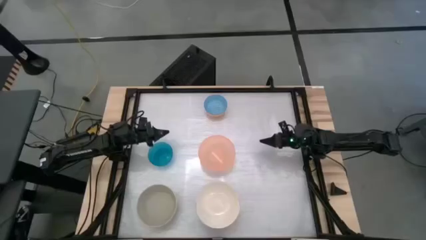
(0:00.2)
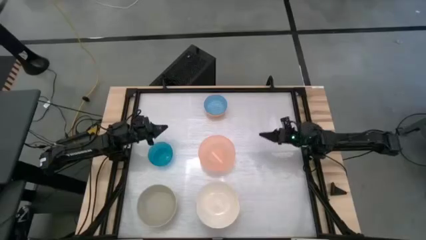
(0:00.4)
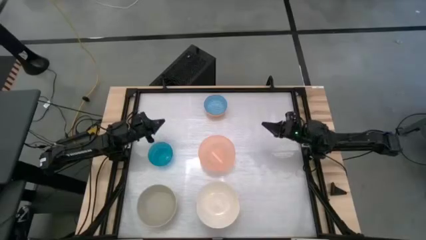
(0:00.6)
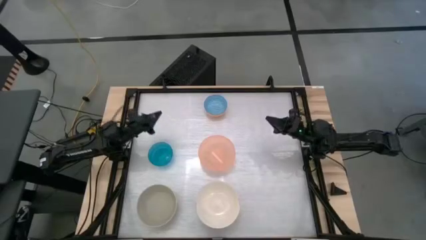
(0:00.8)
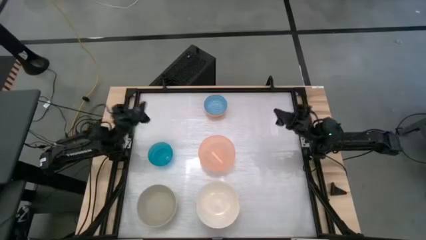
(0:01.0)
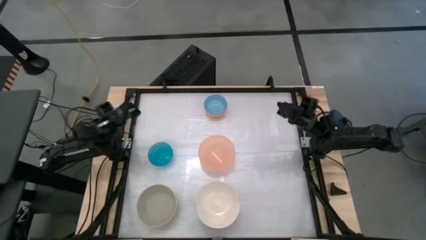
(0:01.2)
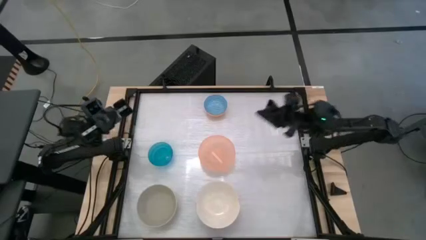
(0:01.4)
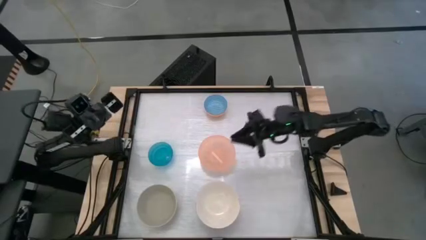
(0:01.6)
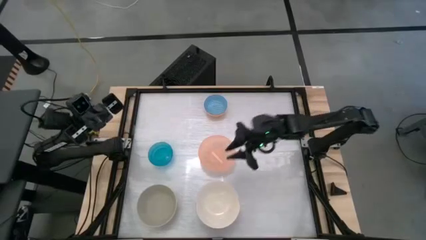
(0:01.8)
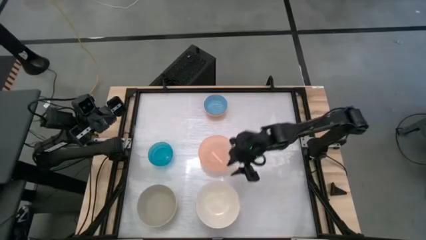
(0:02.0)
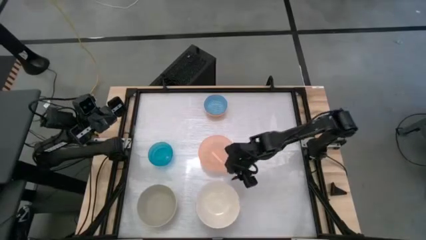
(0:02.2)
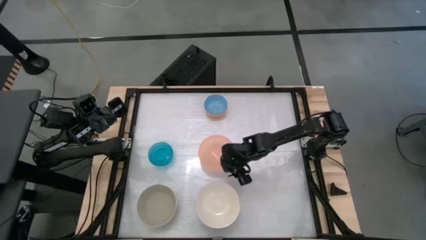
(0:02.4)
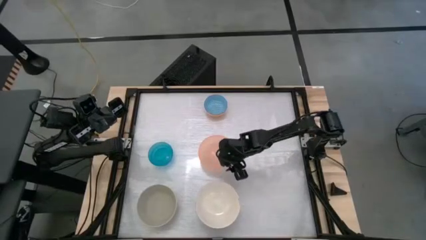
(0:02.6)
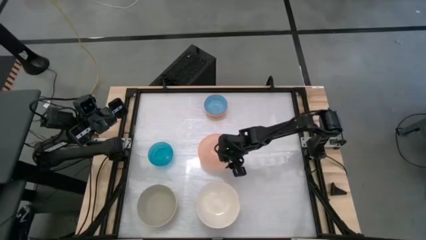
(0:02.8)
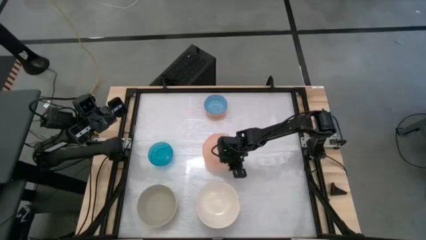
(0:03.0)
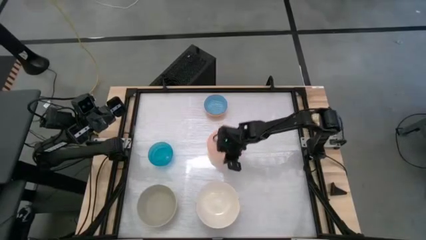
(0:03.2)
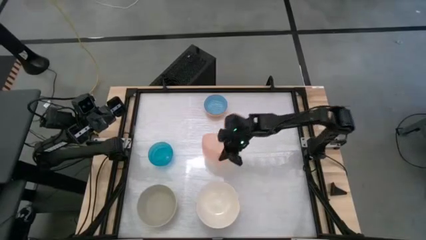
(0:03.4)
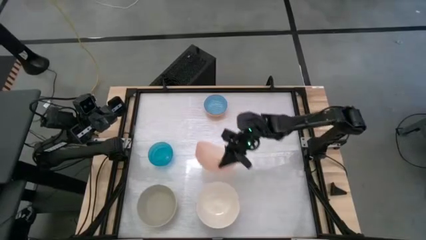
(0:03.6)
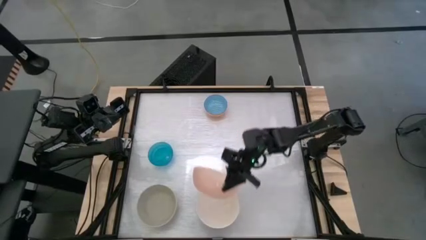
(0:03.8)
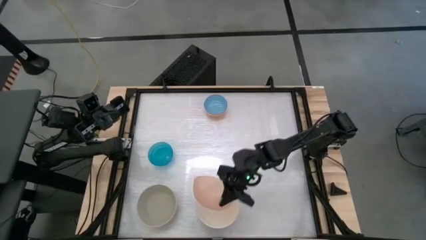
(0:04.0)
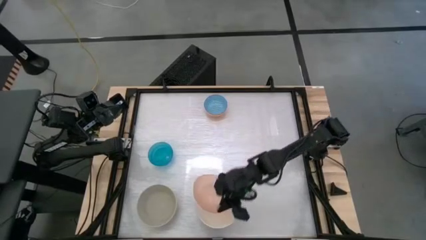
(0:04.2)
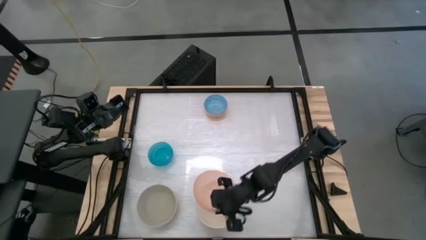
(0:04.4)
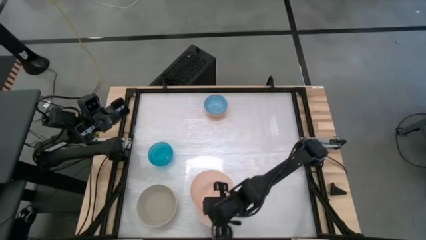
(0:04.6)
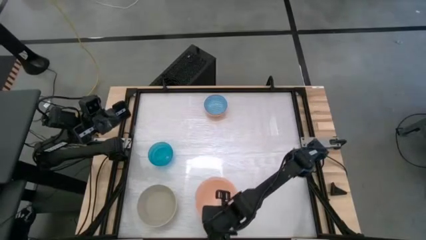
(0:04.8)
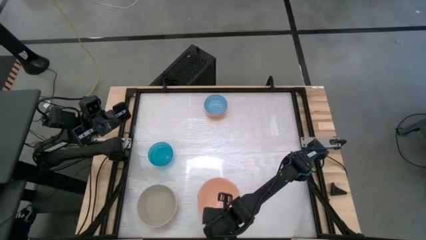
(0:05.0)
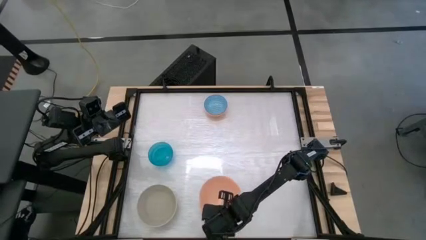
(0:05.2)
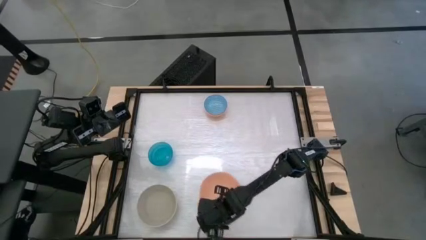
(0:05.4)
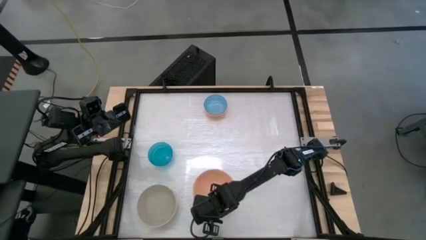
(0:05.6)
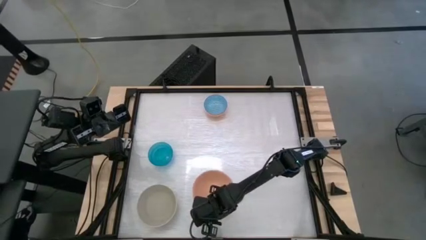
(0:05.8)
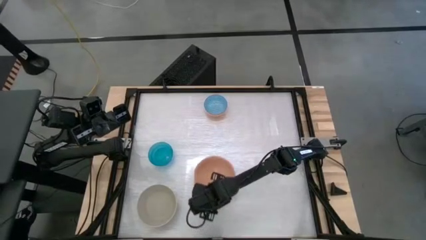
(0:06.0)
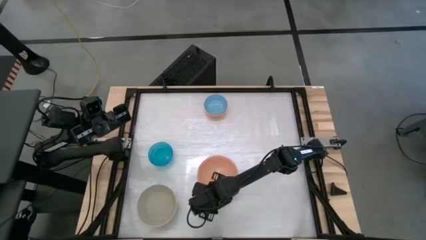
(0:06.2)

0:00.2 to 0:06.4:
Stack the orange bowl on top of the white bowl

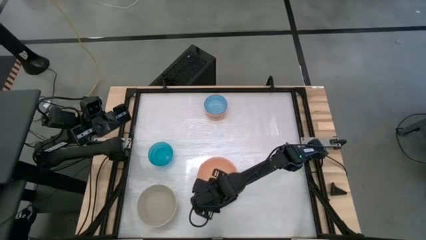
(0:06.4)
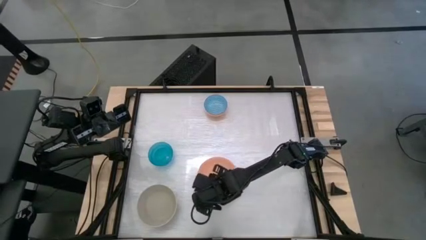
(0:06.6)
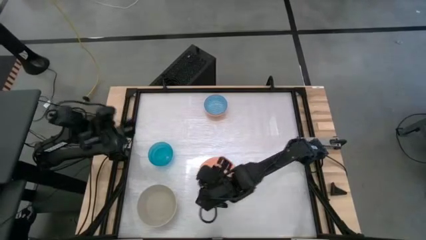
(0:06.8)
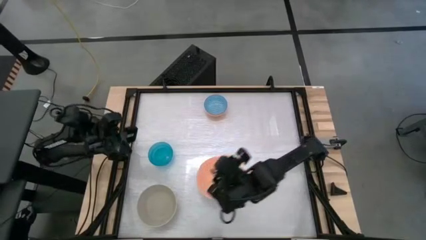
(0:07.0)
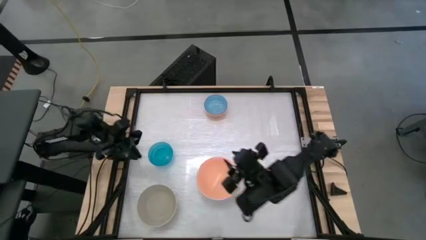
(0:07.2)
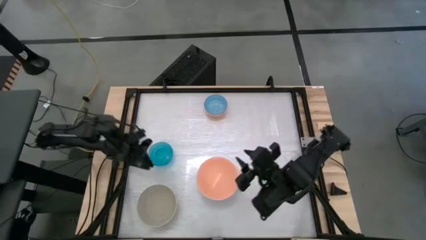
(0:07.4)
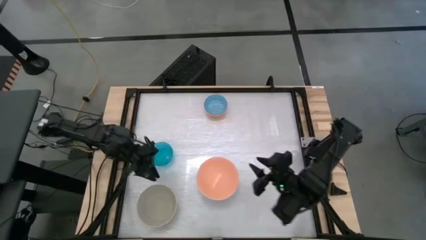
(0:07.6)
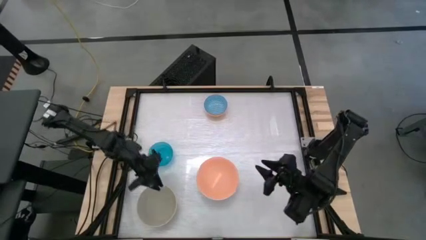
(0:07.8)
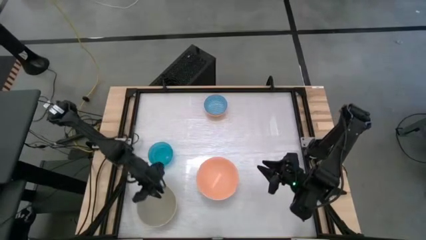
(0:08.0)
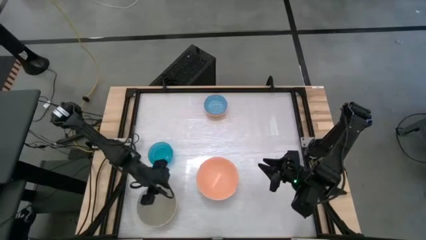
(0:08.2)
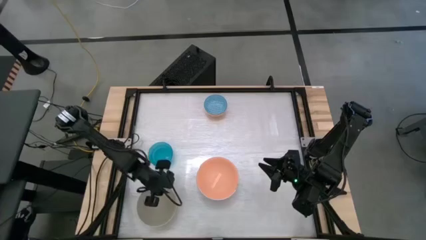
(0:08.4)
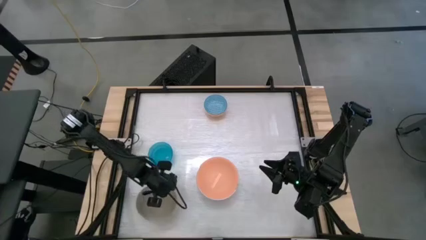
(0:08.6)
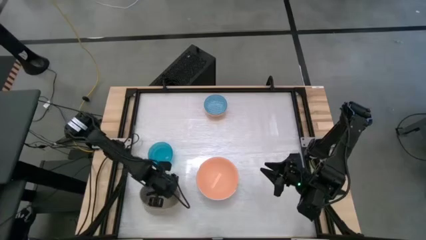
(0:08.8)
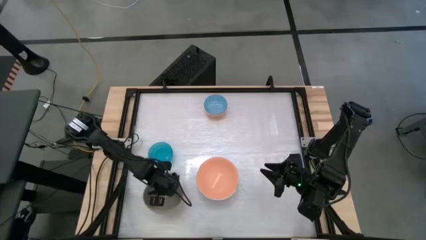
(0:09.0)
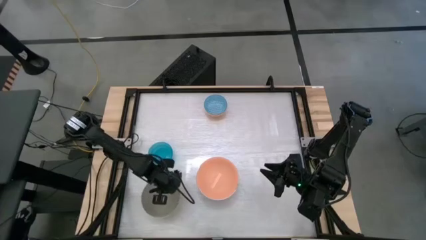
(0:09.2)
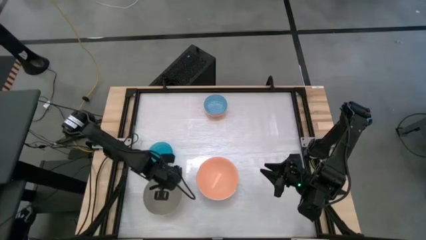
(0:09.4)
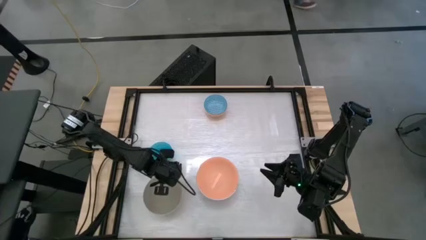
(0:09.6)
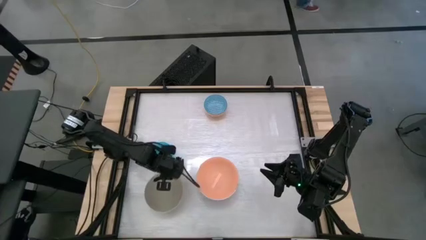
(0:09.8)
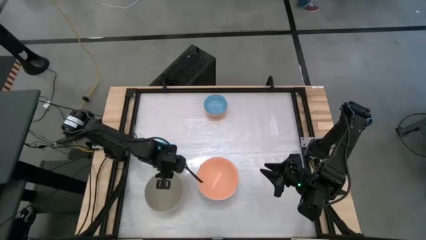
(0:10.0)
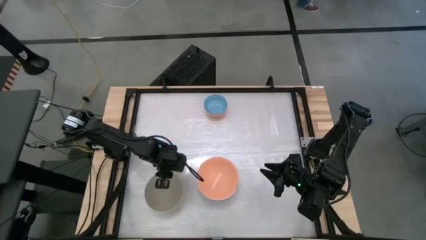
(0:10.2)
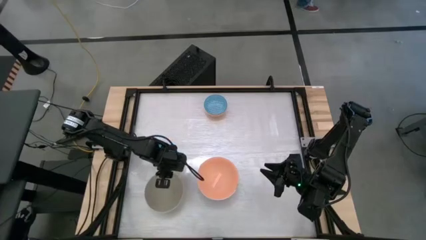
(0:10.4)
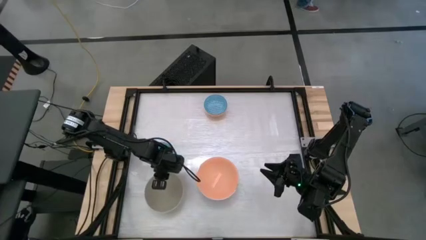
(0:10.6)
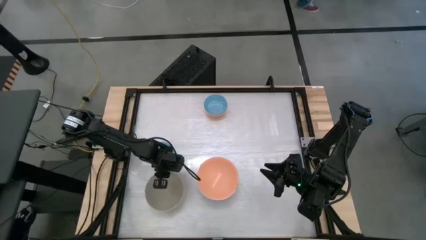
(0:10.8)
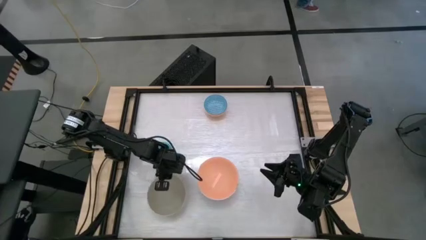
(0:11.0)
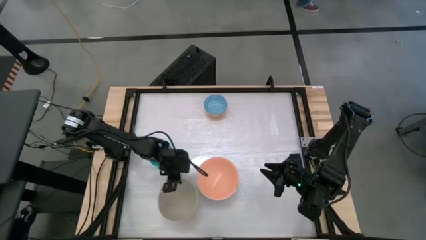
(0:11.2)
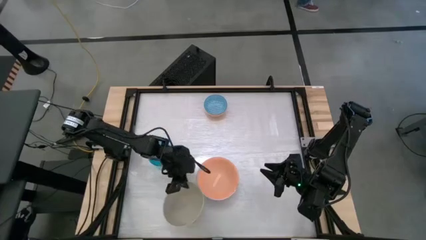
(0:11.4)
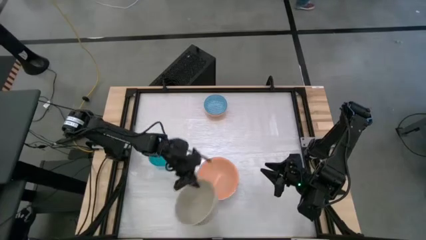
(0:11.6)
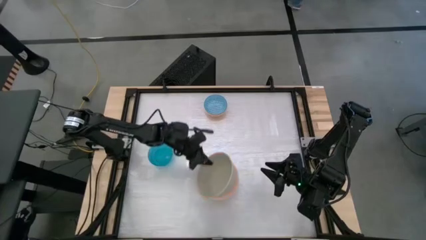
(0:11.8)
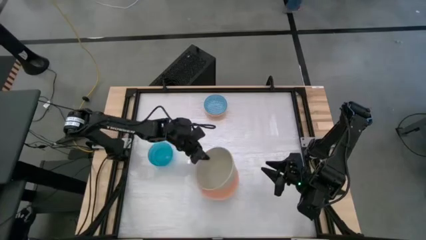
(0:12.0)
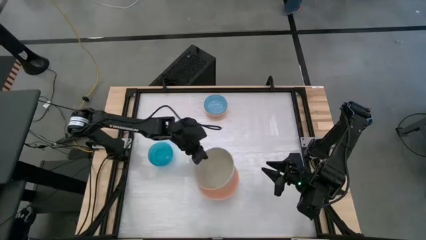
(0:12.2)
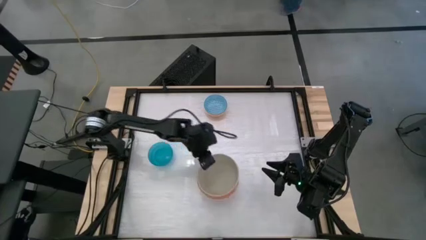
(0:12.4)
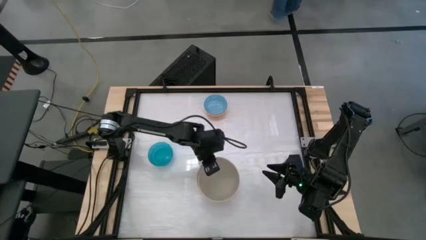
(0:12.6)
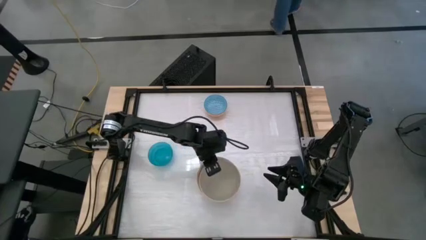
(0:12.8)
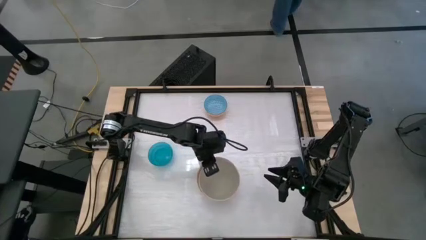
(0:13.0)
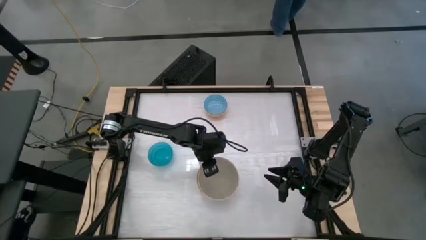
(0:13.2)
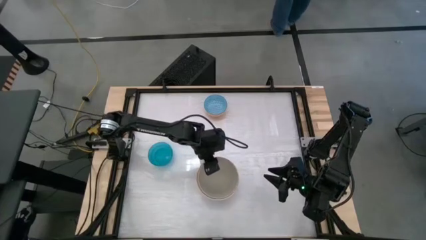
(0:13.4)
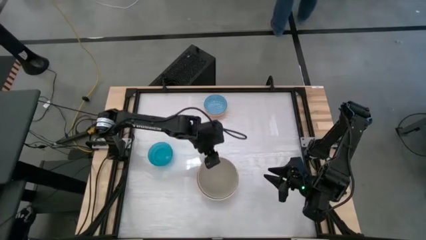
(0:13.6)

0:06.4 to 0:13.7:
Stack the gray bowl on top of the orange bowl

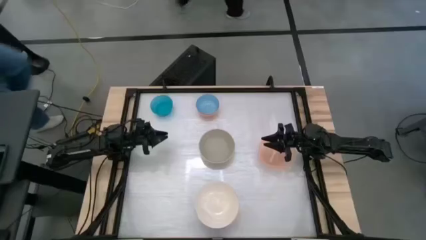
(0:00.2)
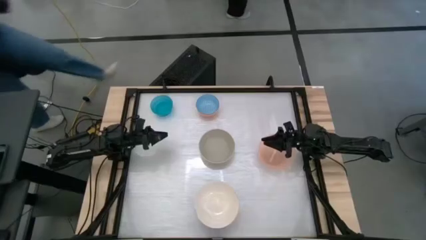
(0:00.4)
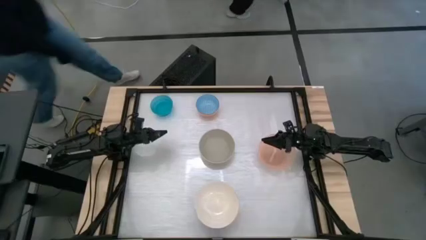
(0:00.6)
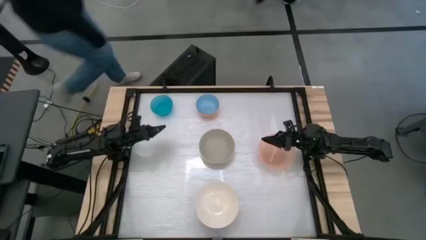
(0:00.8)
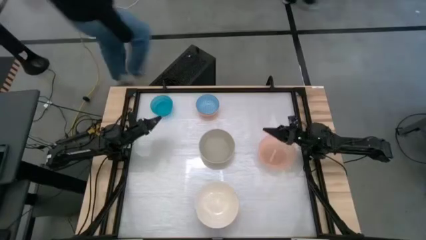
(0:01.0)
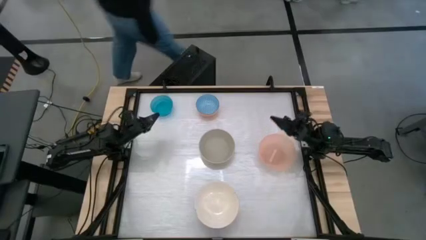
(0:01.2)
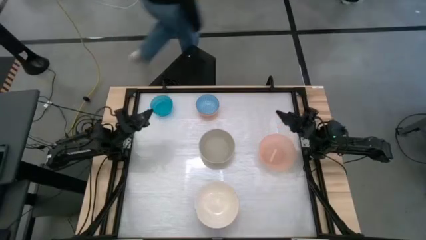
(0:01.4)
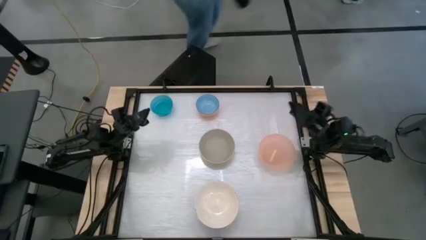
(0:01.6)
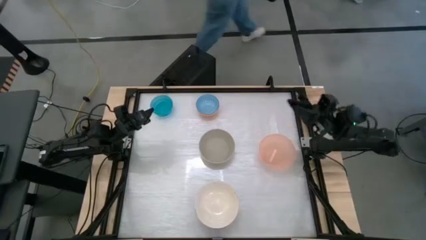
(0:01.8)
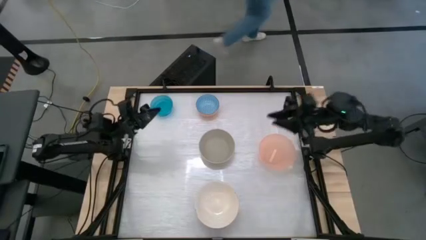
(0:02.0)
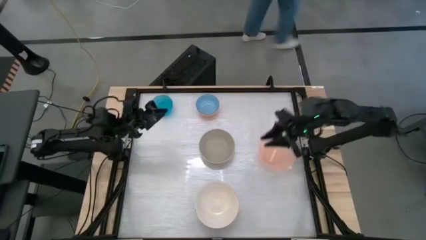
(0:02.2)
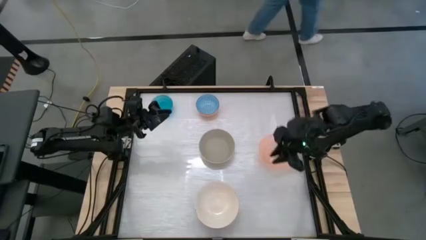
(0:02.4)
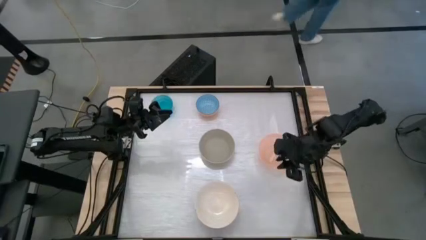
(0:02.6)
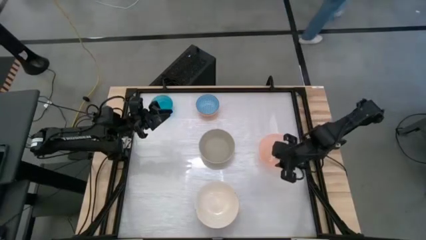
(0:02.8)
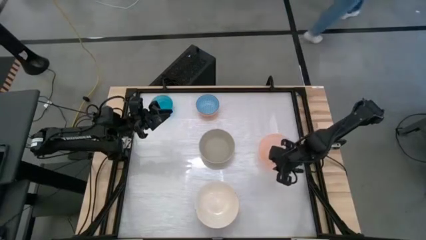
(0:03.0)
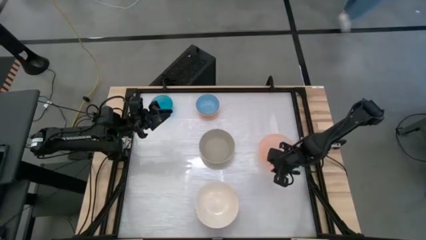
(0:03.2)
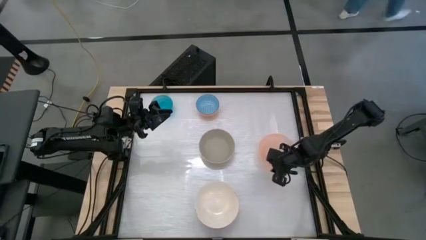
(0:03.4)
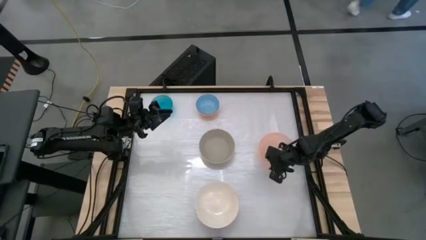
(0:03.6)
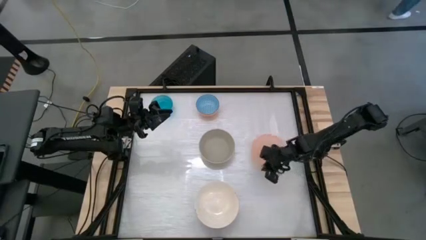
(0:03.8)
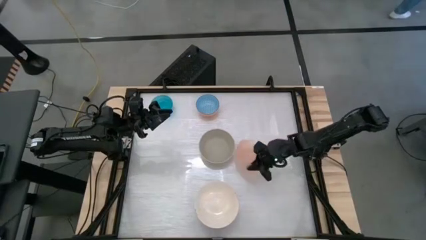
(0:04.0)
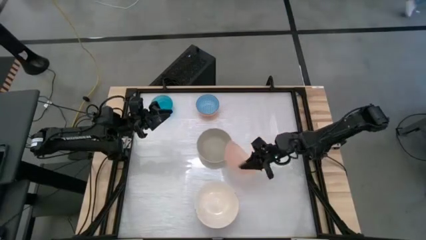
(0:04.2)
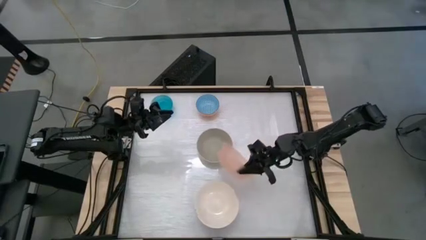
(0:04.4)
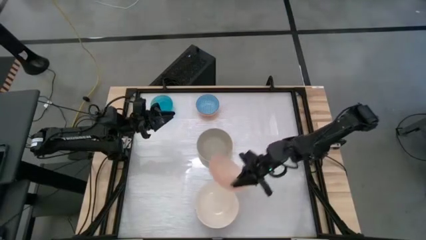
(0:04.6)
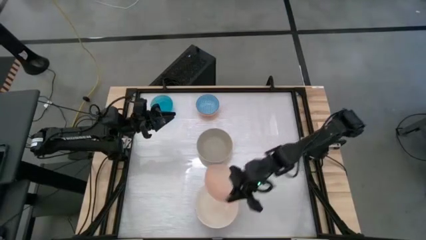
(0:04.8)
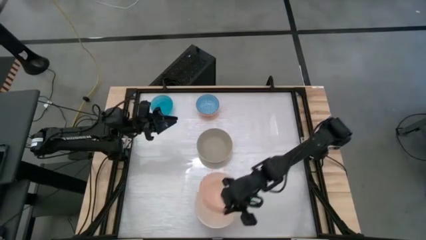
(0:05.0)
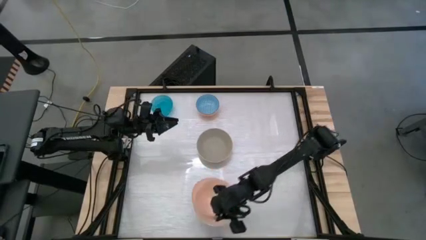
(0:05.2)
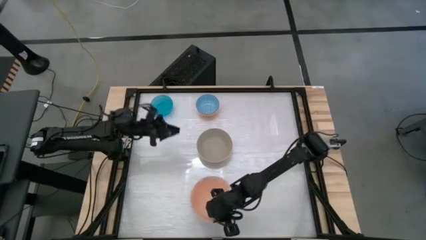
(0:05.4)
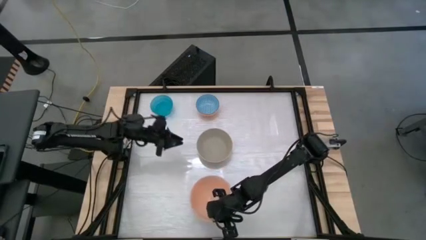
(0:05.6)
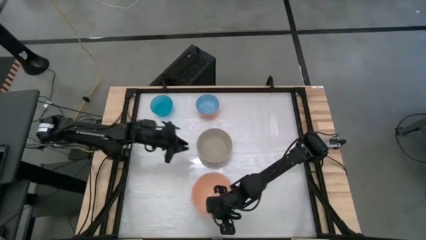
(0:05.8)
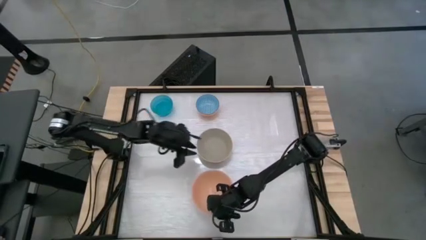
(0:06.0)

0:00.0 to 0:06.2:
Stack the light orange bowl on top of the white bowl
